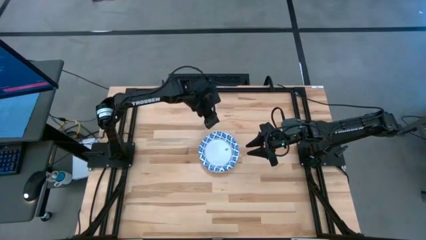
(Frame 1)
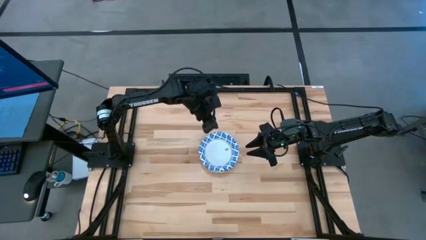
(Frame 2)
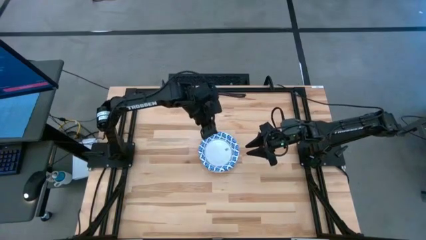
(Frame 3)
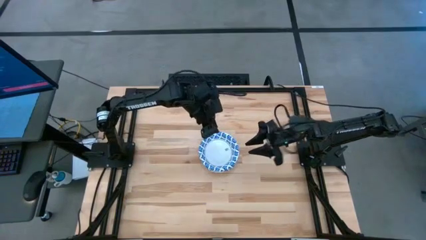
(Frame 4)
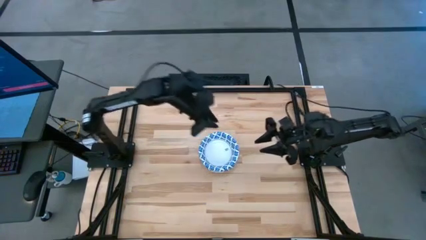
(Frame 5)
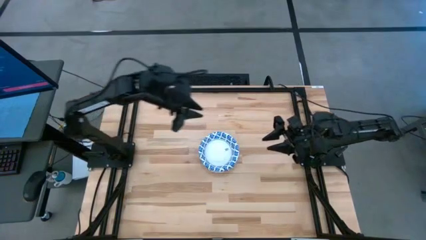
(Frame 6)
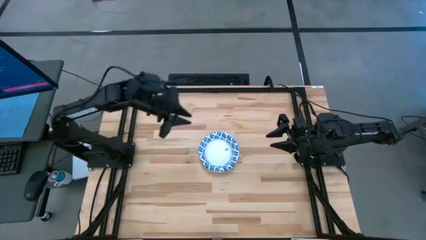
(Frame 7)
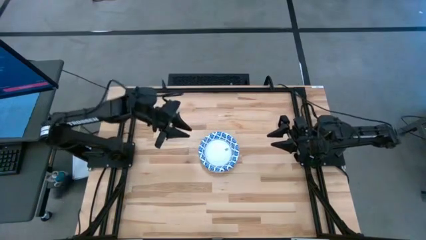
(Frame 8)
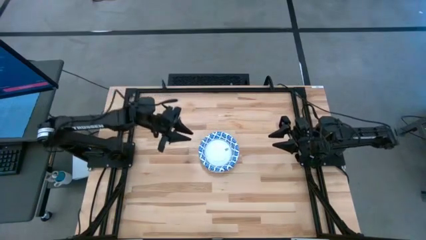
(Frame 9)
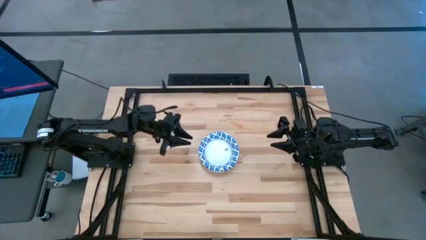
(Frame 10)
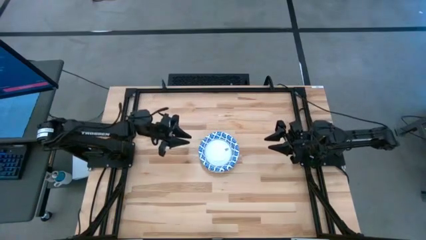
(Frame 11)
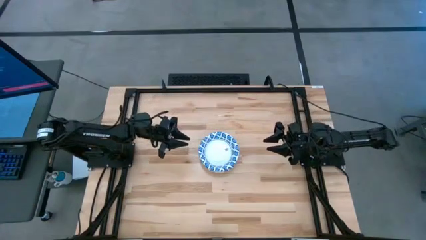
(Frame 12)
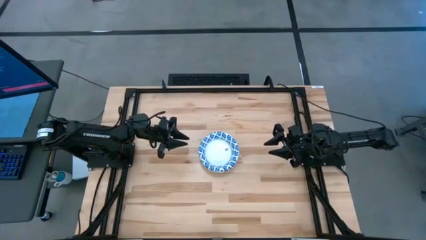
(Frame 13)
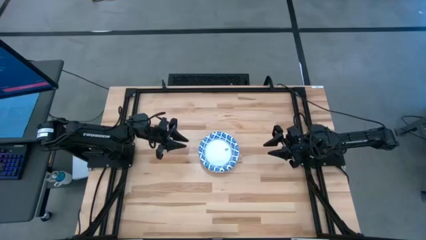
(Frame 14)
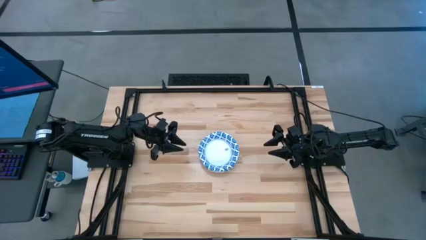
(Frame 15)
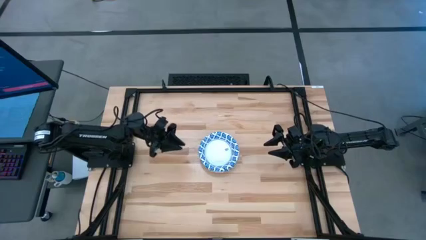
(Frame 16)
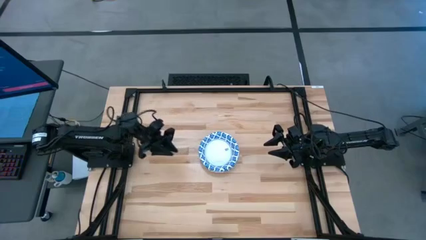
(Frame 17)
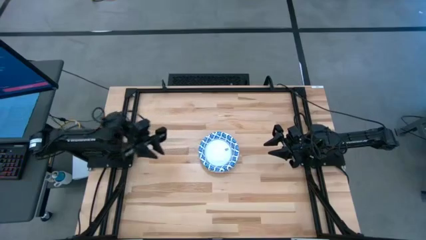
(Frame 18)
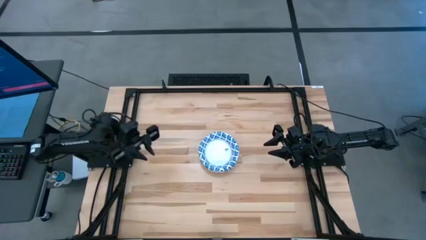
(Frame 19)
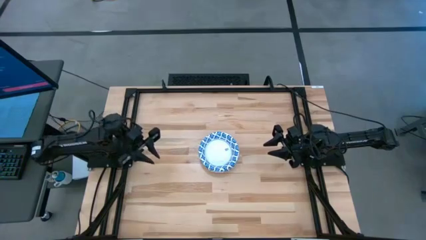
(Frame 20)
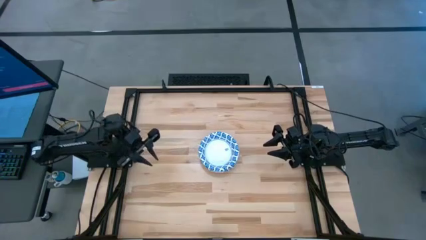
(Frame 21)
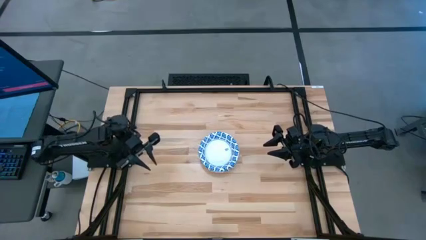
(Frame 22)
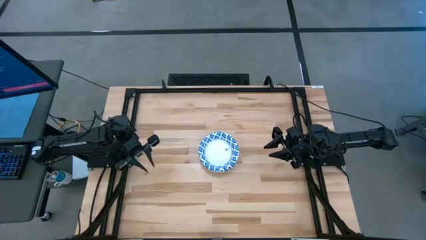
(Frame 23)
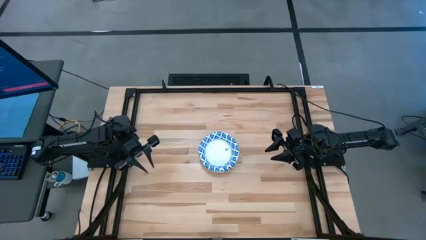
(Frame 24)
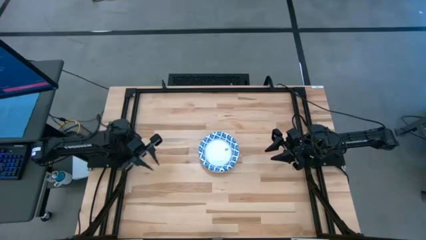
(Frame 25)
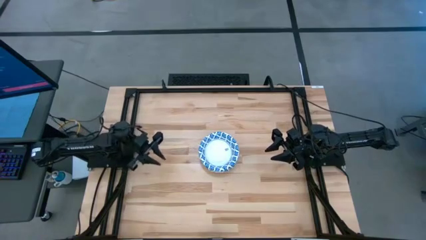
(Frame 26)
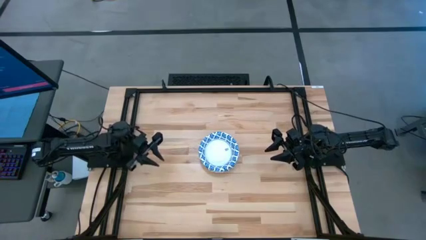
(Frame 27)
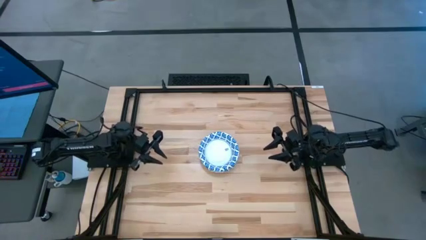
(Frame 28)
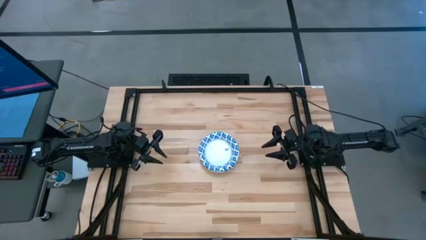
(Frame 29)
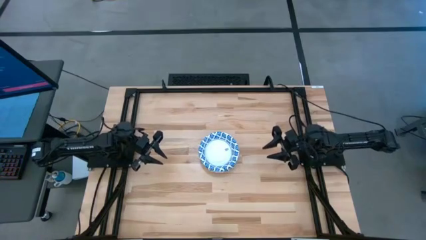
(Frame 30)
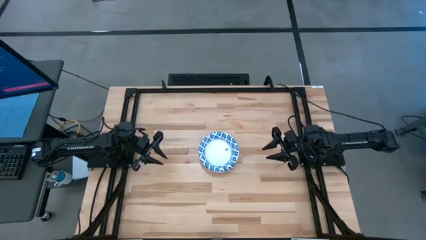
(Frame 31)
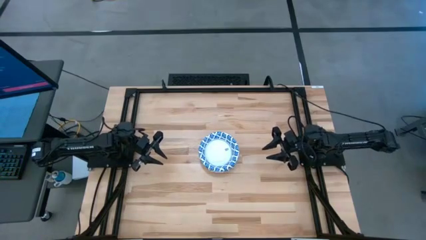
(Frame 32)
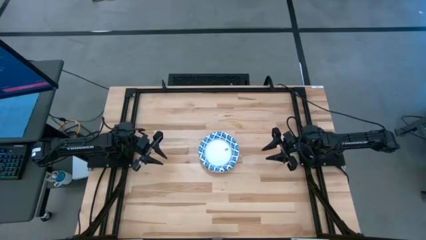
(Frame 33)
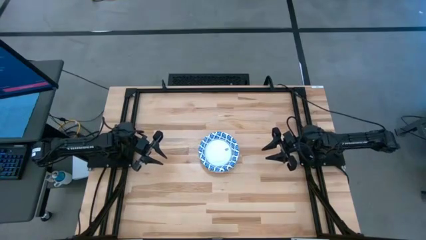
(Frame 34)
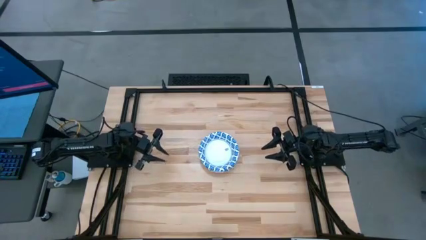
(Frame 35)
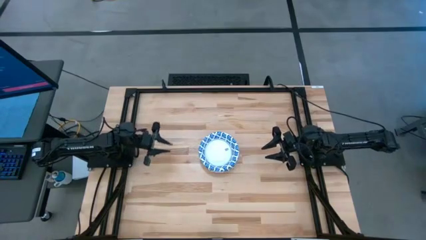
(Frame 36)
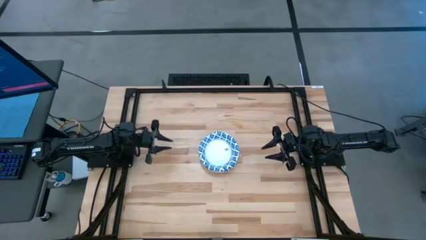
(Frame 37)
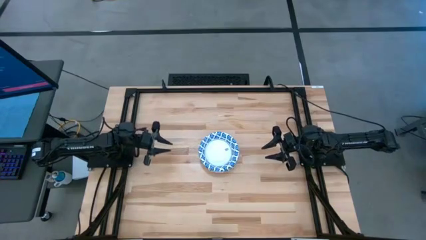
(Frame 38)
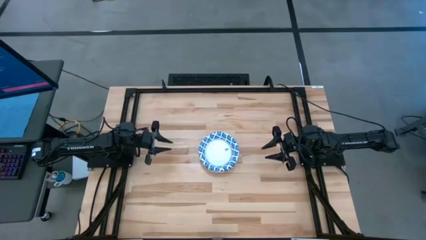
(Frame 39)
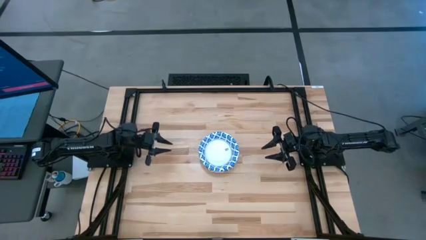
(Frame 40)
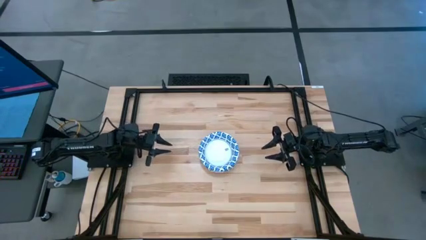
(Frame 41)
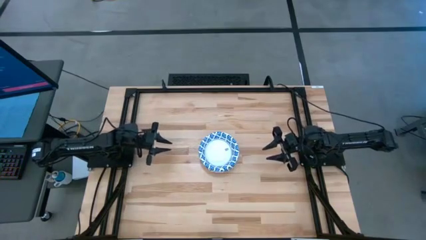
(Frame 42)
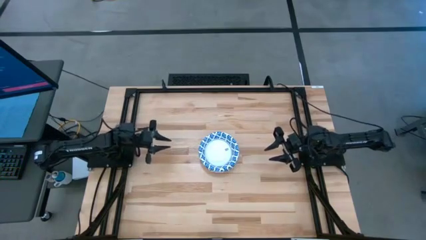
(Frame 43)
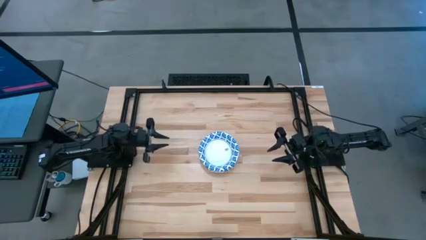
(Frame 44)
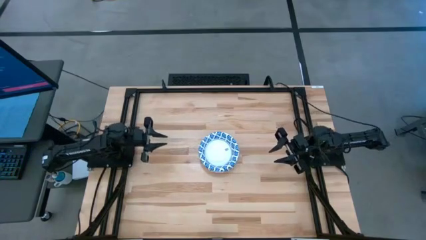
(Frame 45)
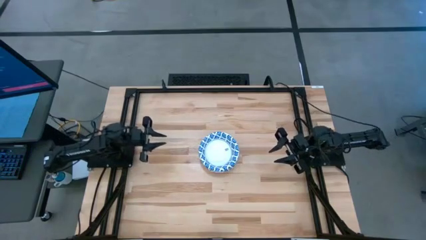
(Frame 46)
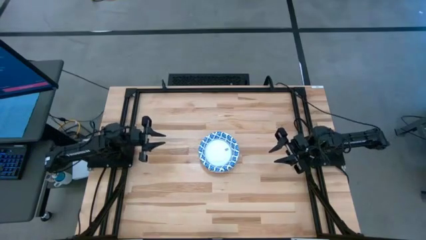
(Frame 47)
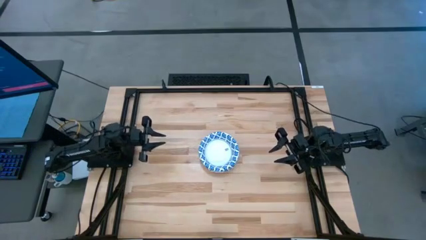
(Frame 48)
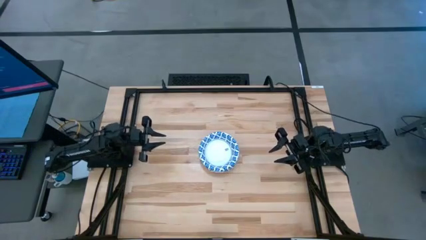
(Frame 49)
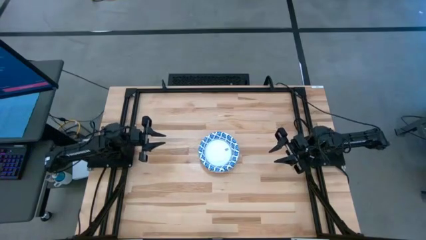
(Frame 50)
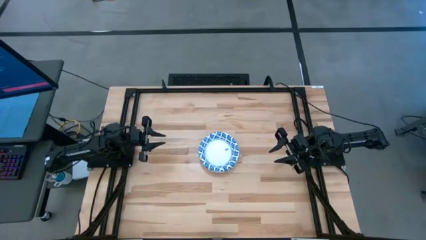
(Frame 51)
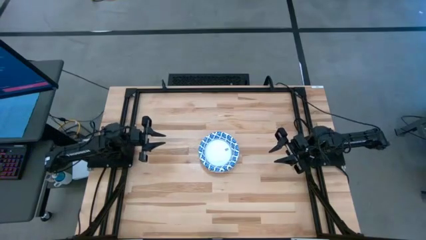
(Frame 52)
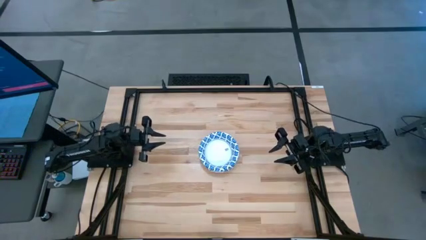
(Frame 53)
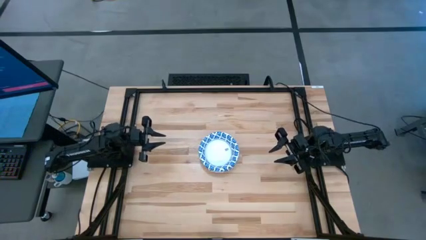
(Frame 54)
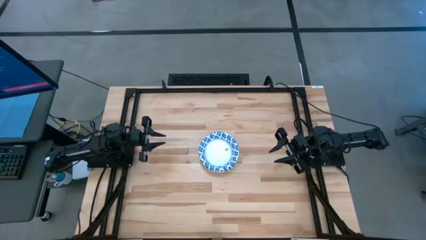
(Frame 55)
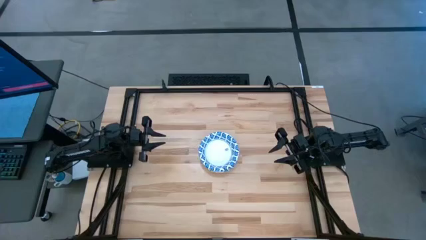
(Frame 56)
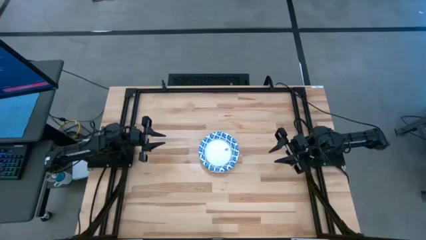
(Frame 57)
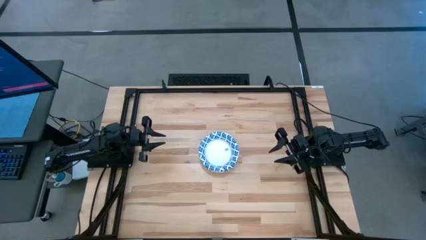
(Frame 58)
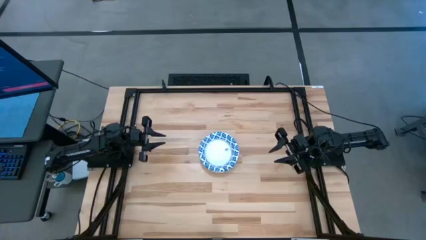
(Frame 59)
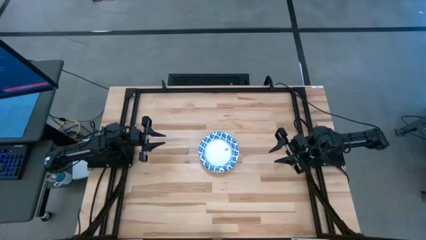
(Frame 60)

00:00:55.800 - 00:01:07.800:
Task: Nest bowls inside each other
Return to Home Position
